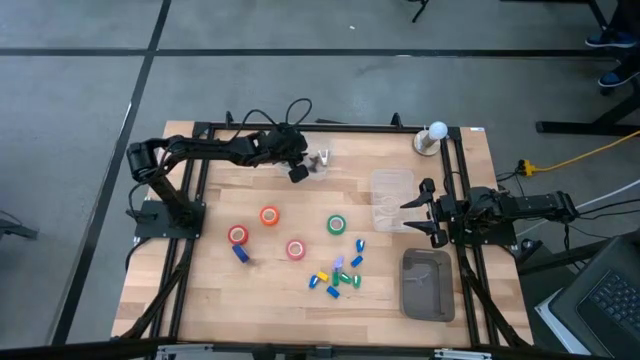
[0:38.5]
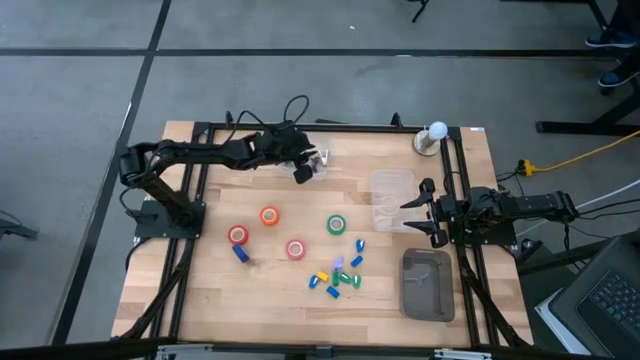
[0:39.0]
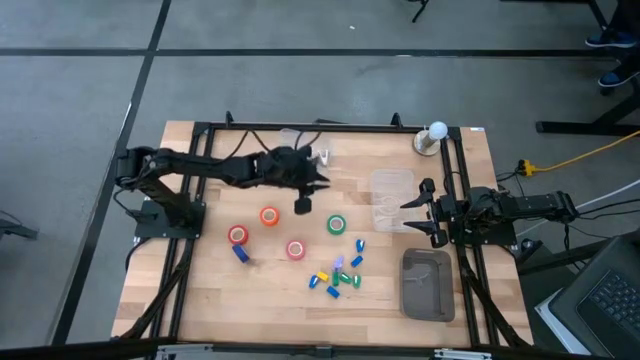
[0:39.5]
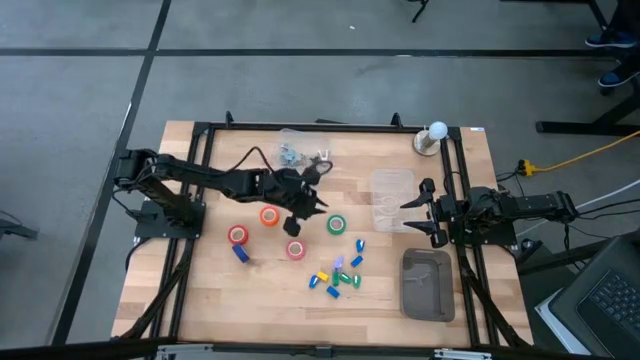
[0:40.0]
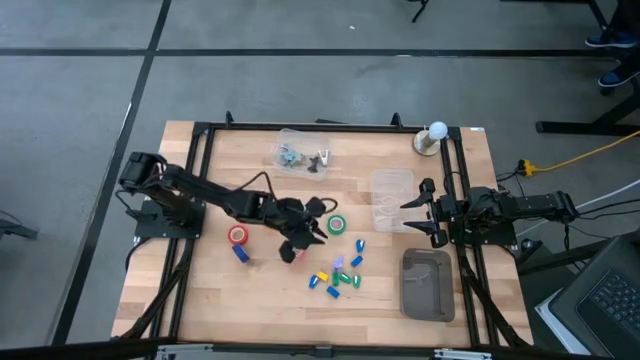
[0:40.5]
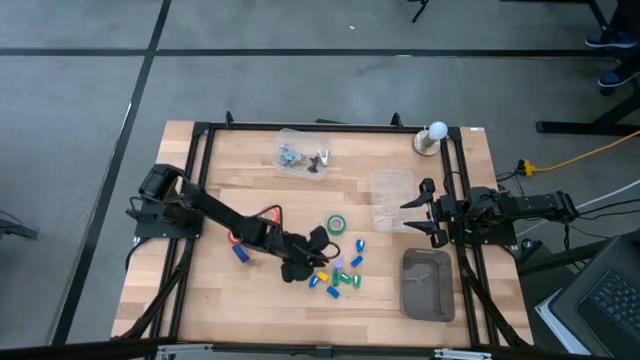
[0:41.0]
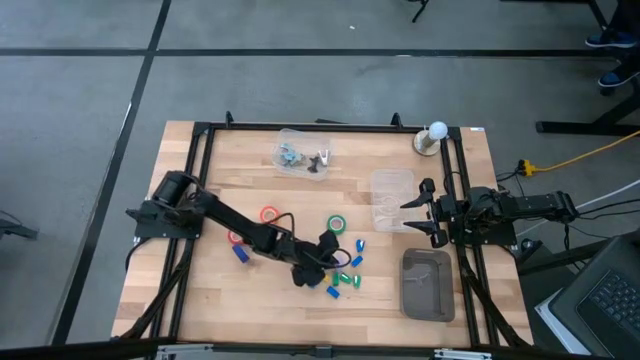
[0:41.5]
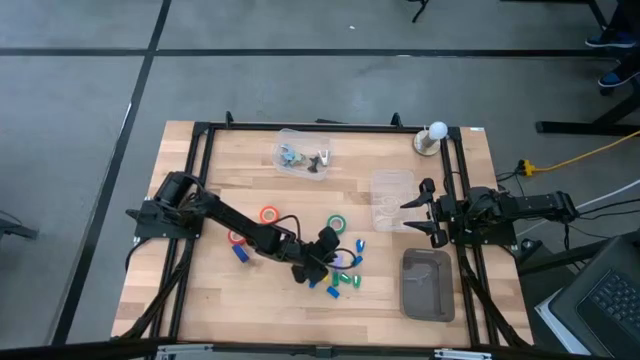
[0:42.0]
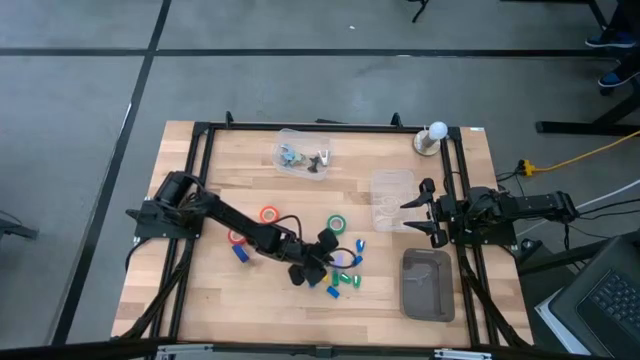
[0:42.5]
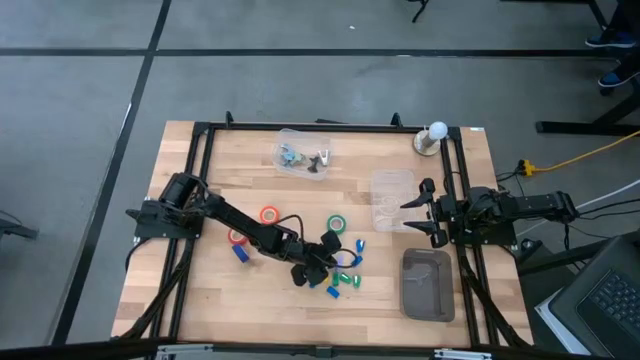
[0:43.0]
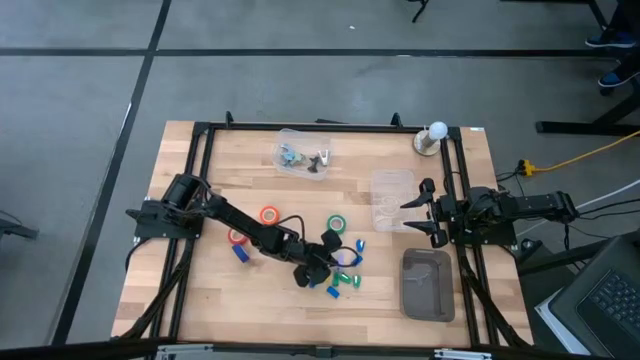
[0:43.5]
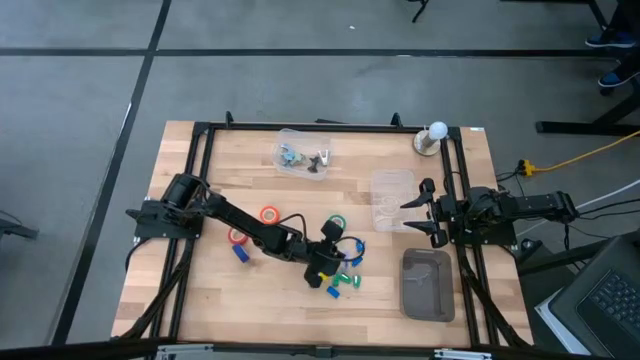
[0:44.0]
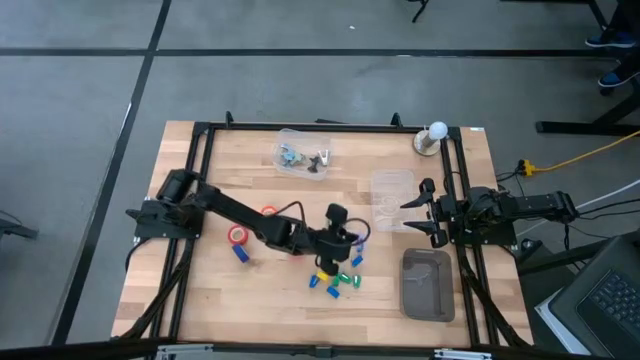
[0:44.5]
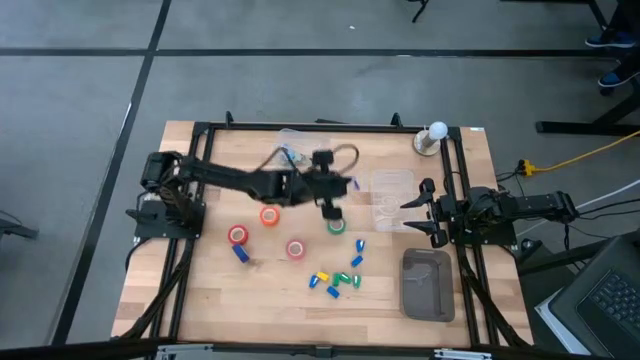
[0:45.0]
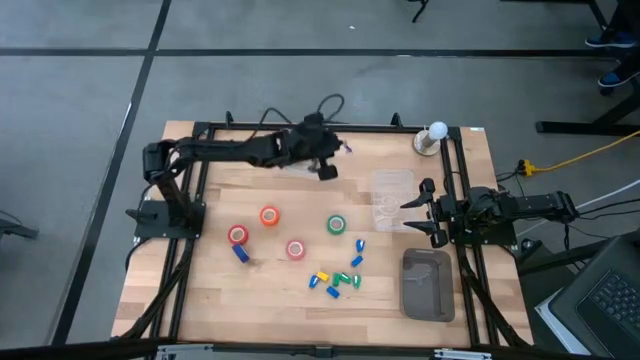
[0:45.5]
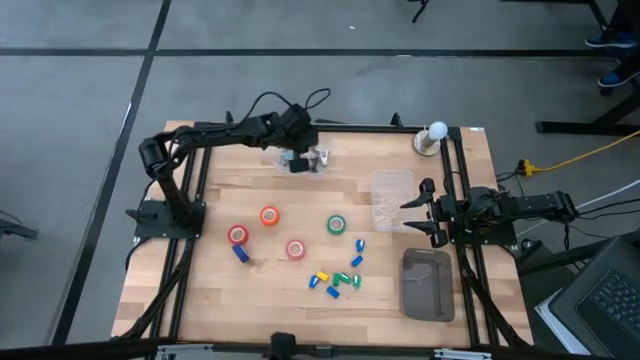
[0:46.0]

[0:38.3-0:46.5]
Task: Pick and place Stapler, Stapler remover, tape
Put the violet staple remover into the top transparent bin

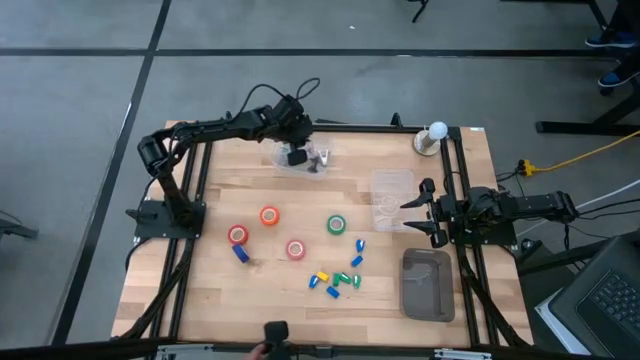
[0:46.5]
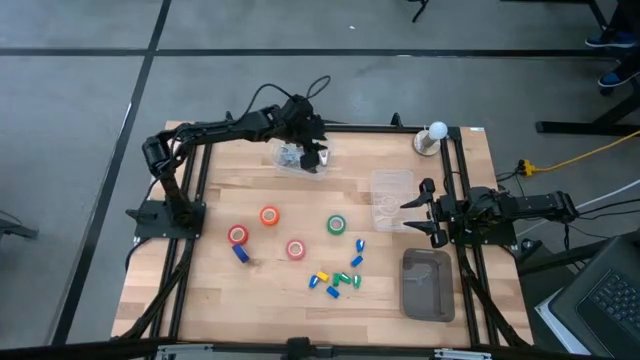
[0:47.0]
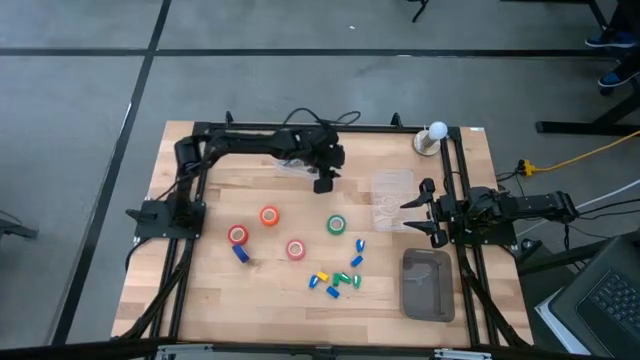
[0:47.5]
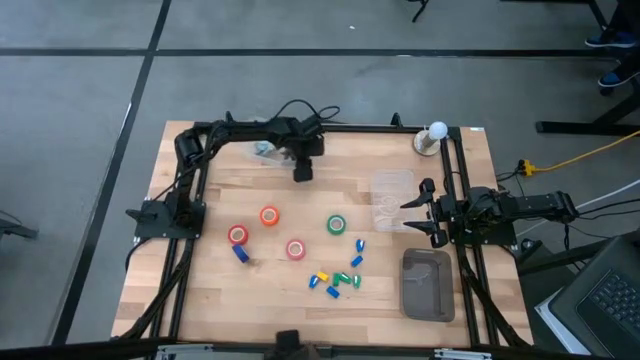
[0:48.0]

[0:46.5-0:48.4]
Adjust the top transparent bin

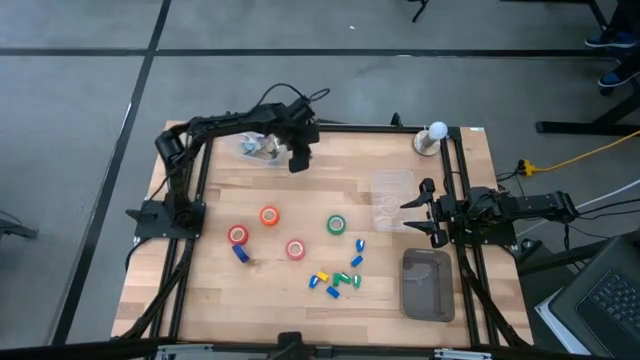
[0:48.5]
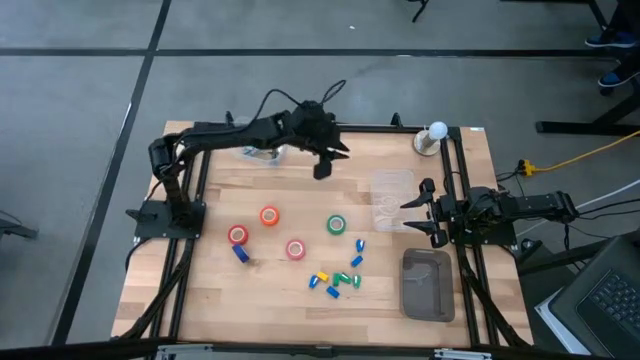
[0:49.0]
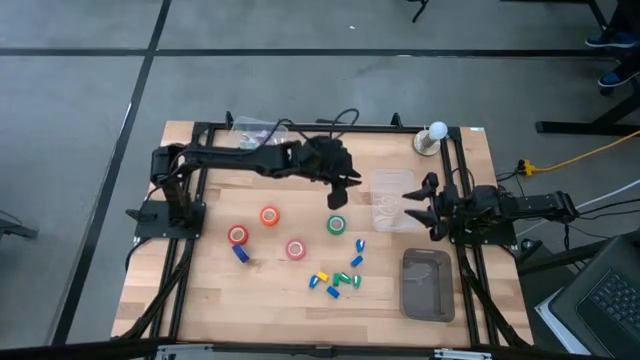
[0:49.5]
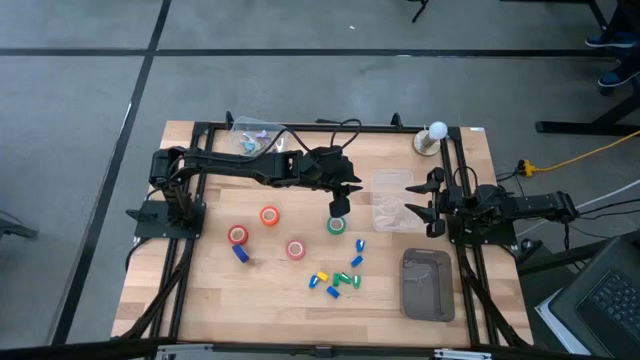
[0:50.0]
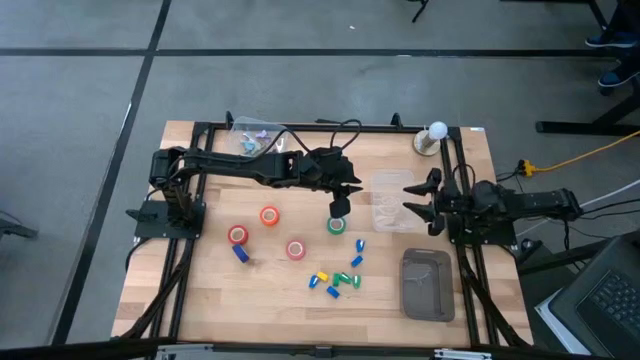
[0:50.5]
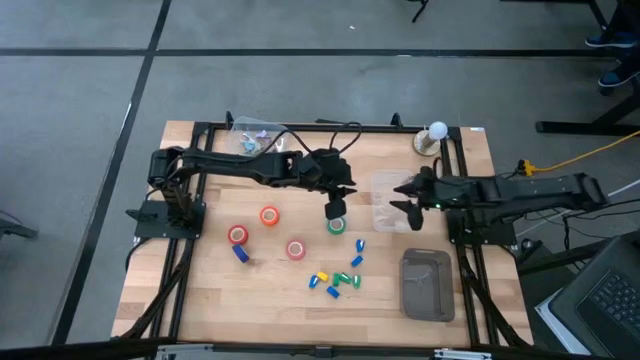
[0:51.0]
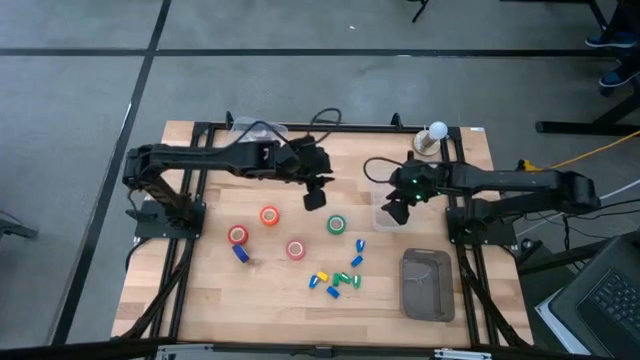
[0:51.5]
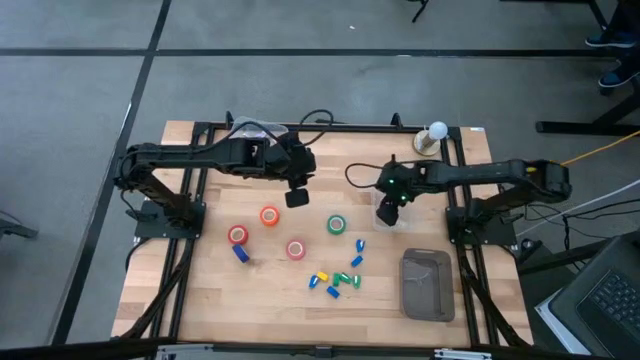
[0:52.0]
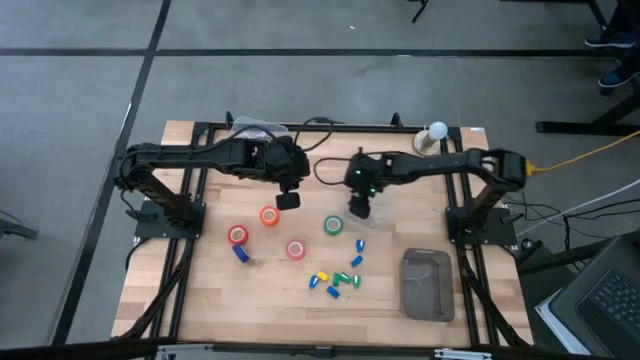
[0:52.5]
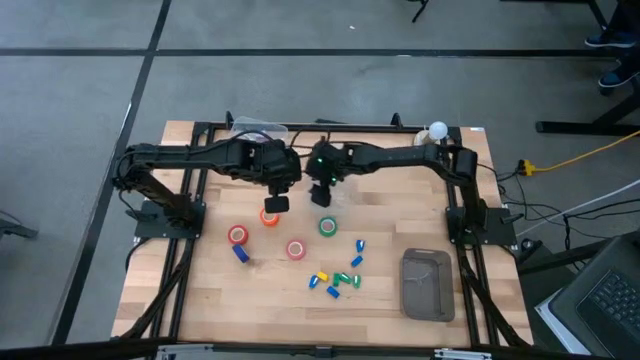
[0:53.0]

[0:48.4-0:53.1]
Move the bottom transparent bin to the center of the table

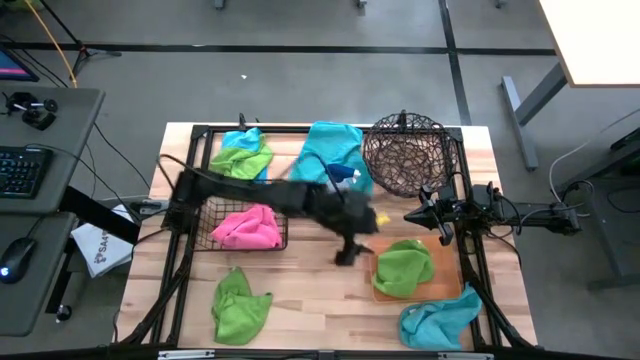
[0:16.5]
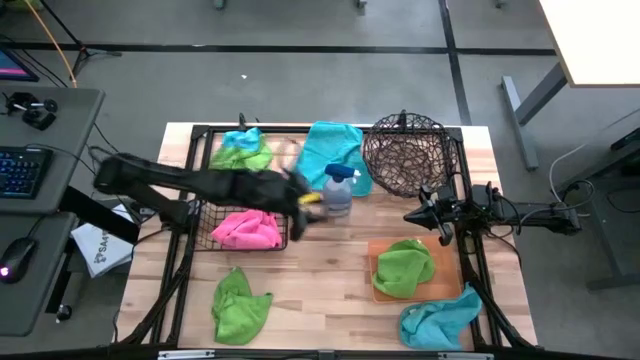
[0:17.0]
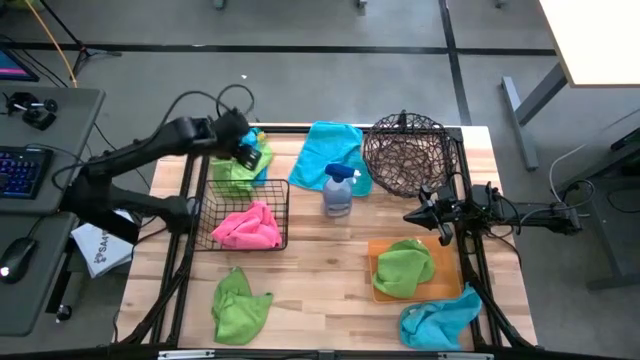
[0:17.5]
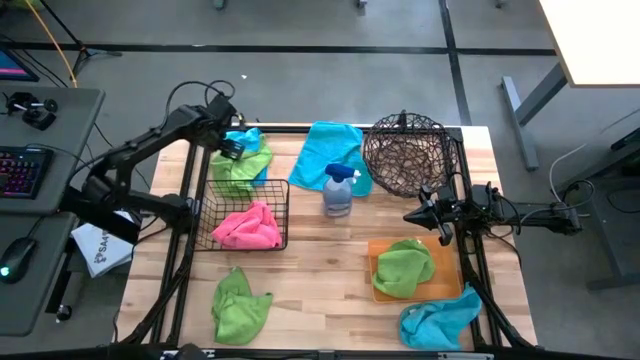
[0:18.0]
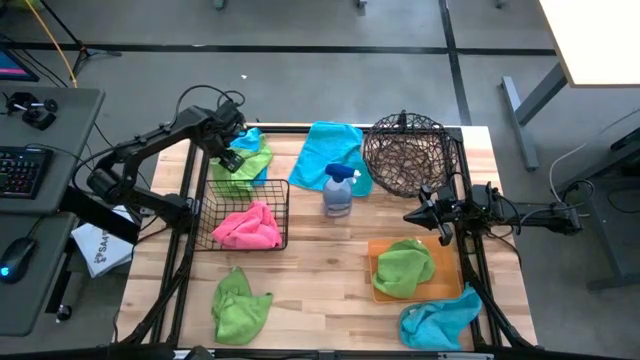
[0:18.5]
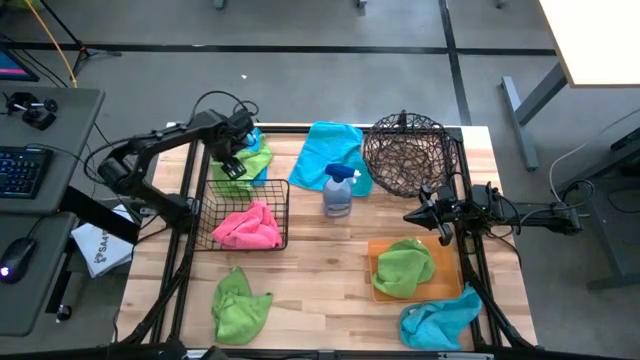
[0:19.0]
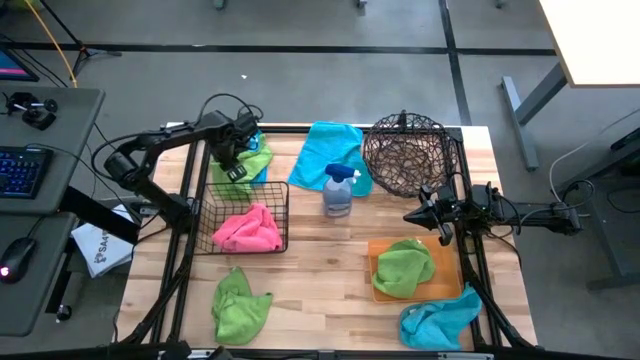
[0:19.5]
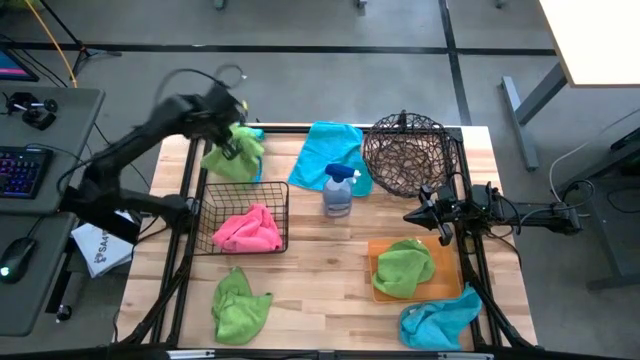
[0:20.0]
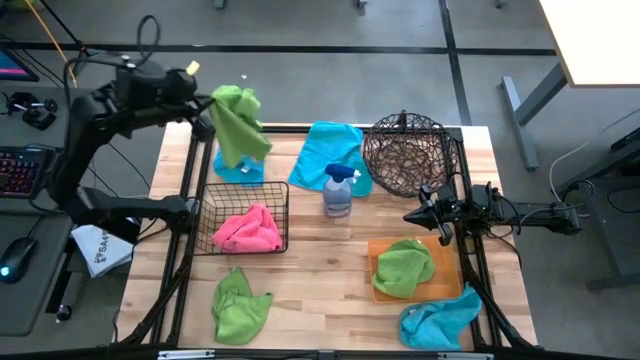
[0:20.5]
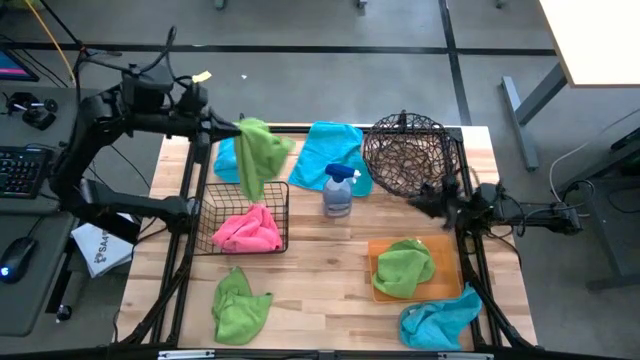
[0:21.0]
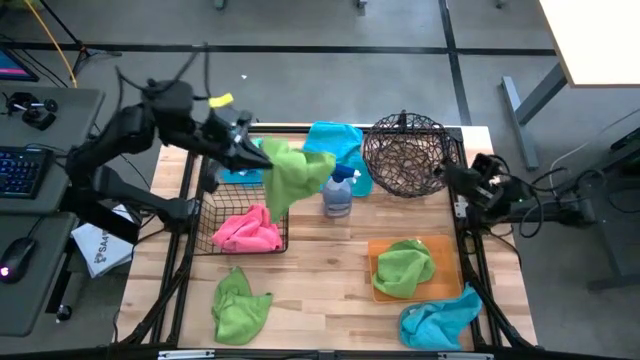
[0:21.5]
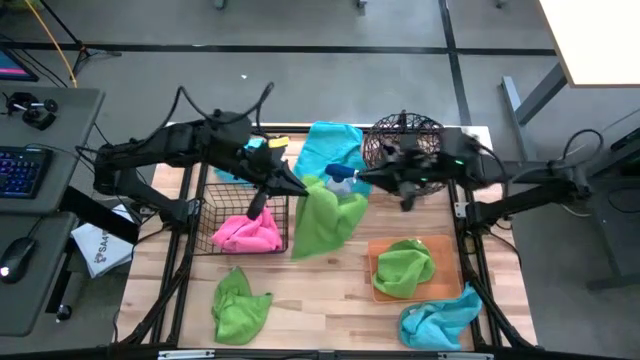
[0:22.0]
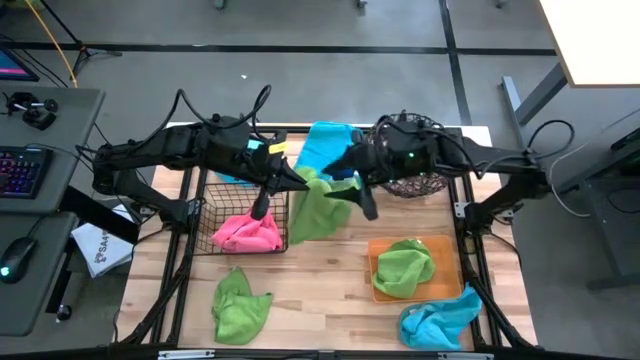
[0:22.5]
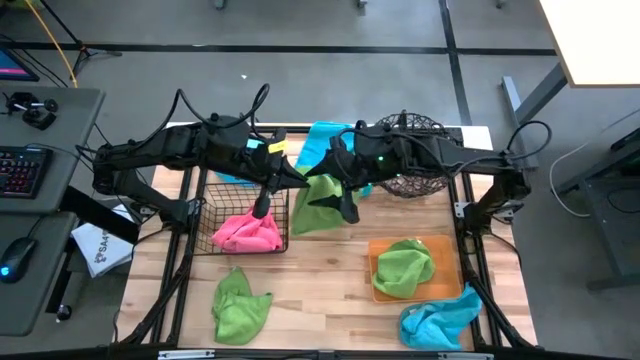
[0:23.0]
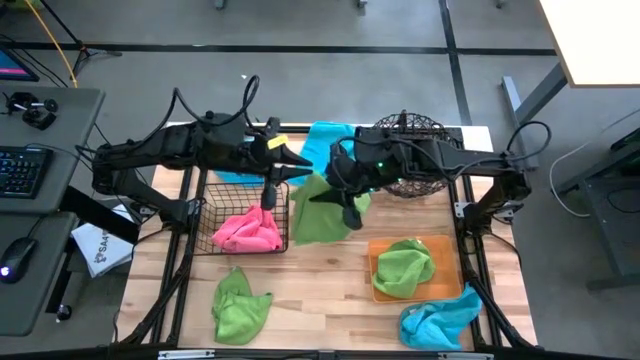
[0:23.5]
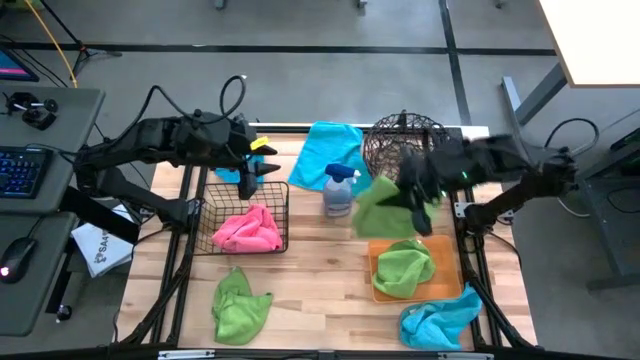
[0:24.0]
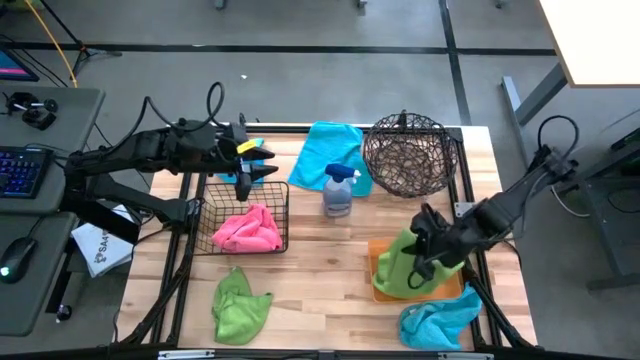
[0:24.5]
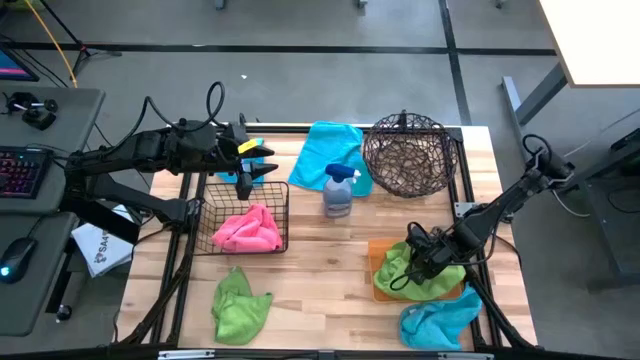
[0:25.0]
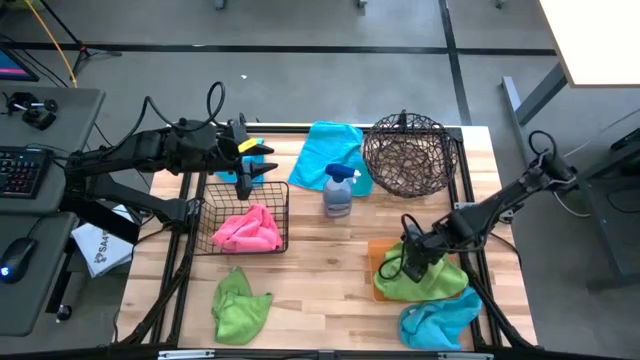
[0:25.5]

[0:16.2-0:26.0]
Task: Sort microfiber towel by color & place in baskets
Put the top green microfiber cloth into the orange bin
